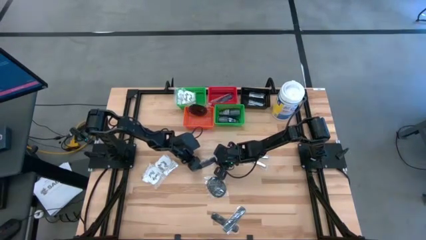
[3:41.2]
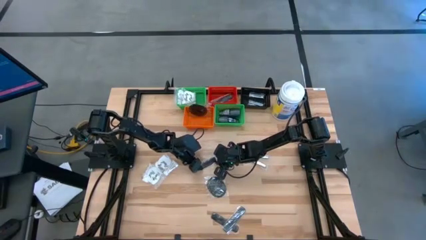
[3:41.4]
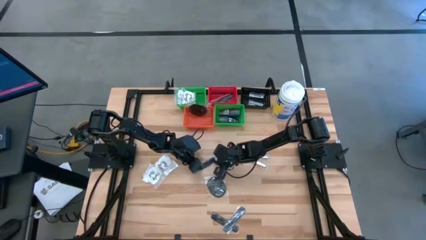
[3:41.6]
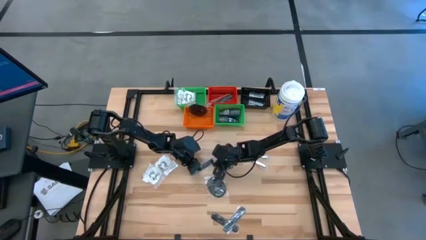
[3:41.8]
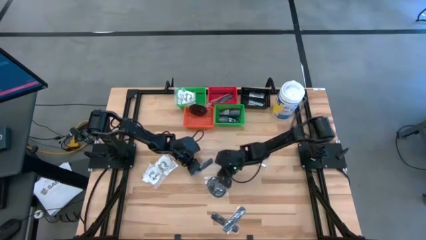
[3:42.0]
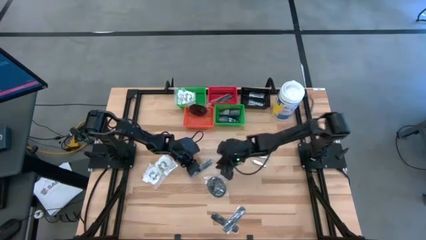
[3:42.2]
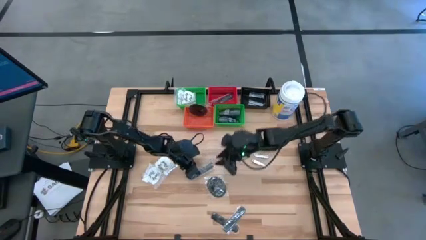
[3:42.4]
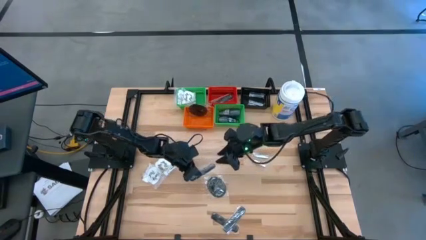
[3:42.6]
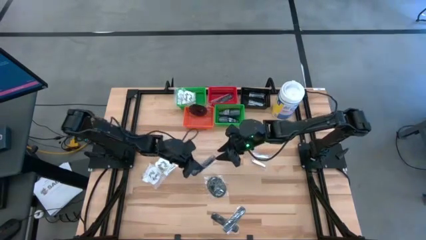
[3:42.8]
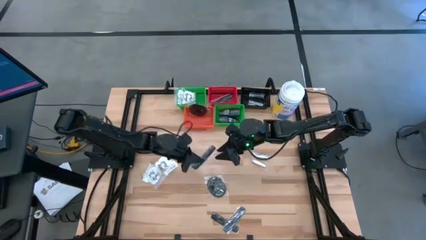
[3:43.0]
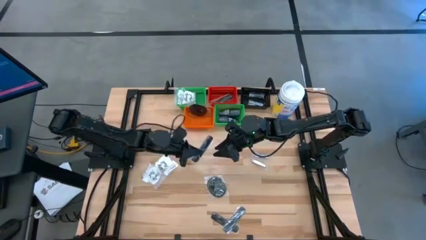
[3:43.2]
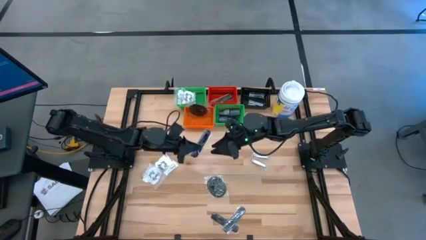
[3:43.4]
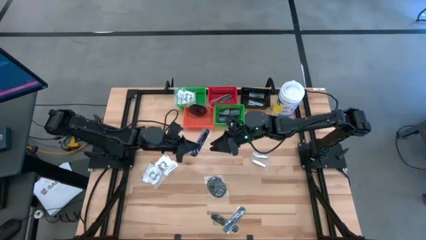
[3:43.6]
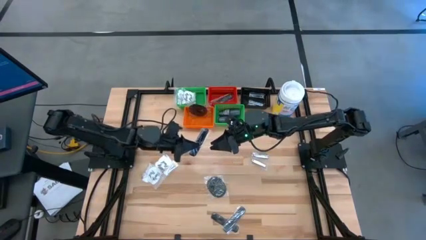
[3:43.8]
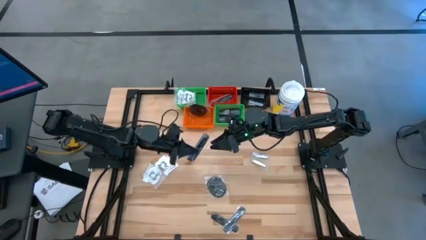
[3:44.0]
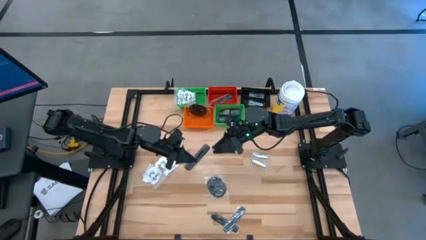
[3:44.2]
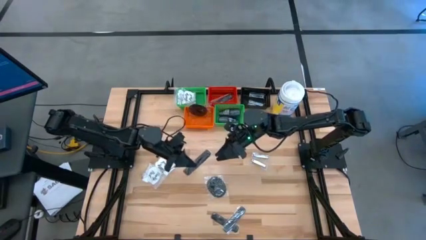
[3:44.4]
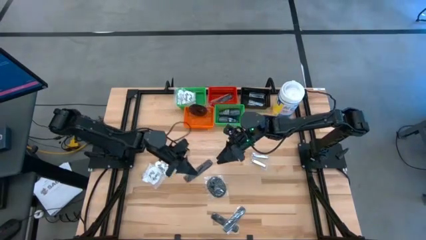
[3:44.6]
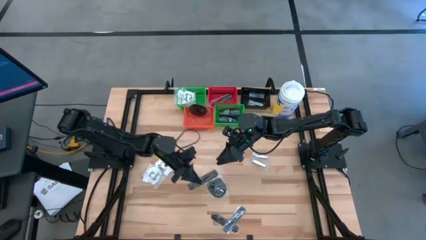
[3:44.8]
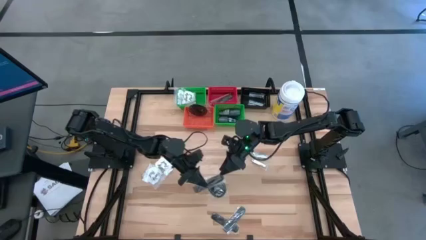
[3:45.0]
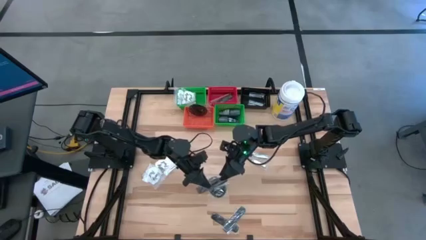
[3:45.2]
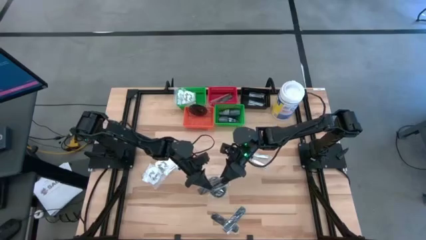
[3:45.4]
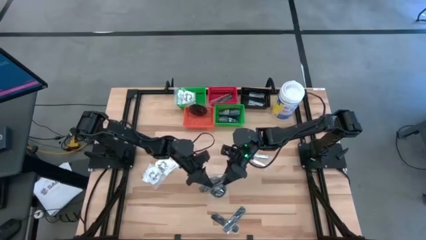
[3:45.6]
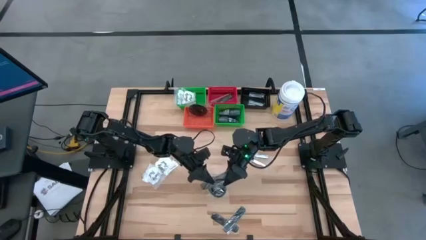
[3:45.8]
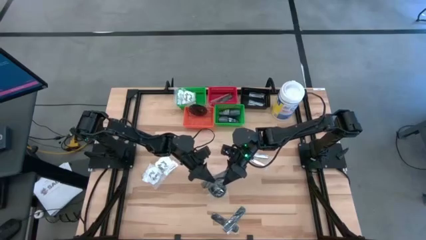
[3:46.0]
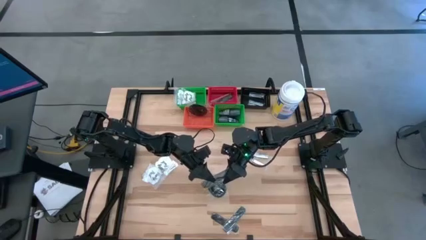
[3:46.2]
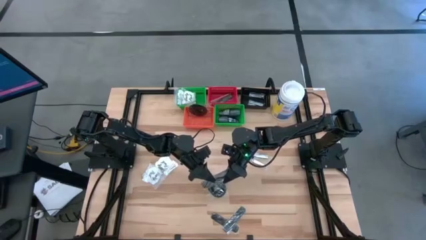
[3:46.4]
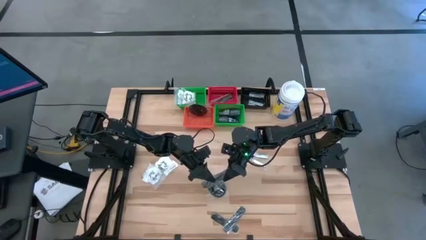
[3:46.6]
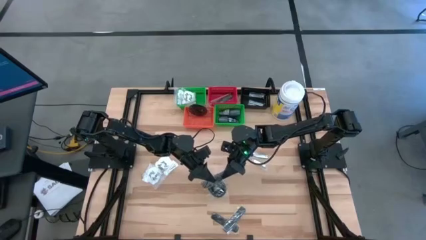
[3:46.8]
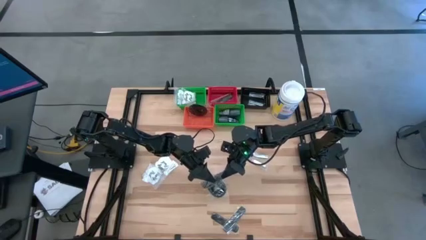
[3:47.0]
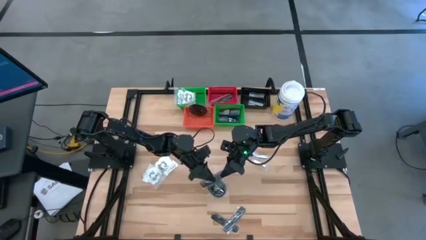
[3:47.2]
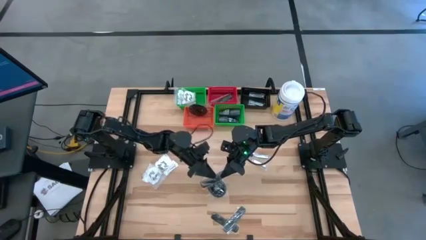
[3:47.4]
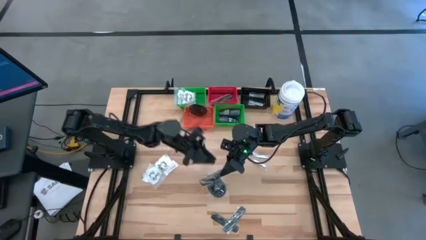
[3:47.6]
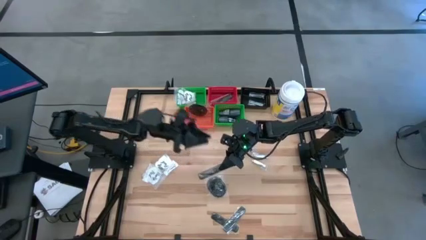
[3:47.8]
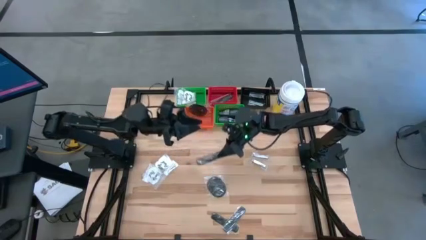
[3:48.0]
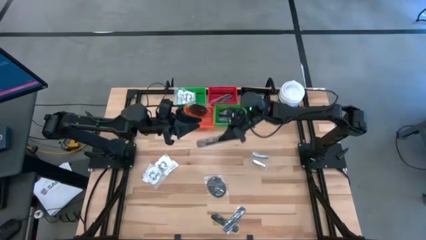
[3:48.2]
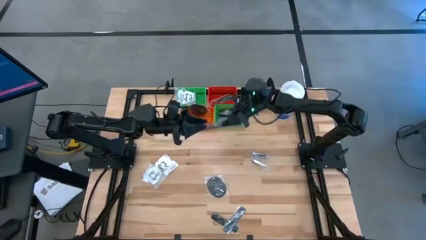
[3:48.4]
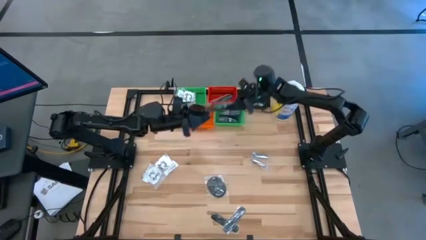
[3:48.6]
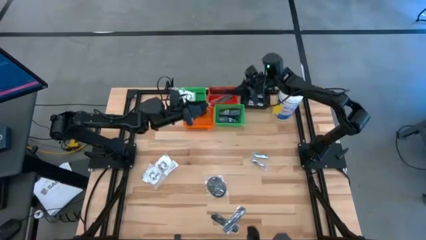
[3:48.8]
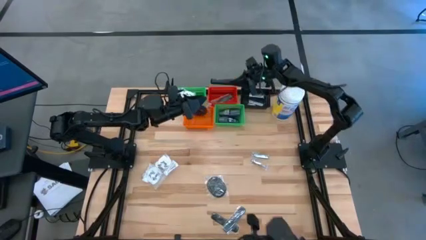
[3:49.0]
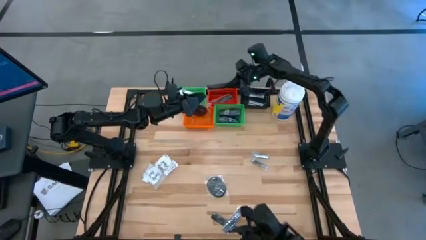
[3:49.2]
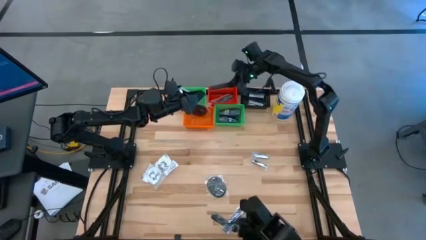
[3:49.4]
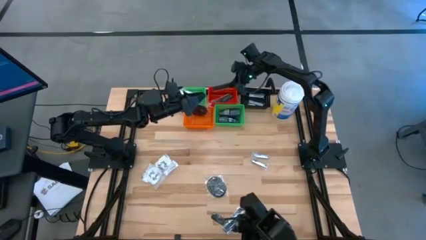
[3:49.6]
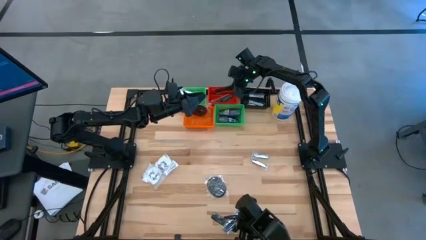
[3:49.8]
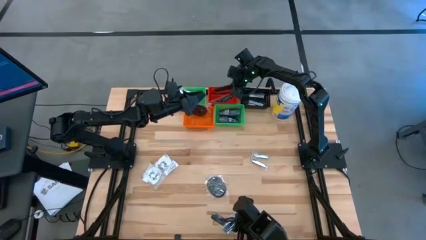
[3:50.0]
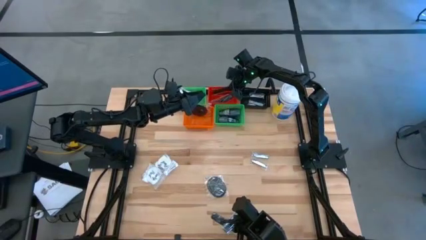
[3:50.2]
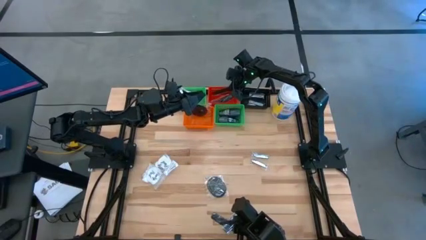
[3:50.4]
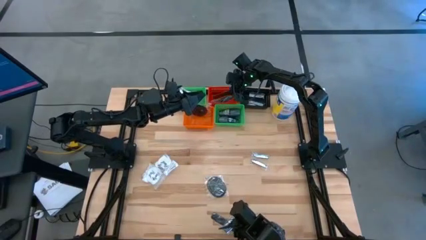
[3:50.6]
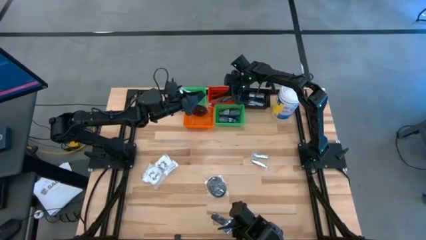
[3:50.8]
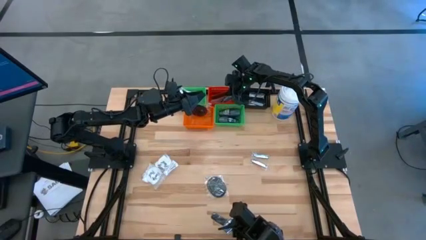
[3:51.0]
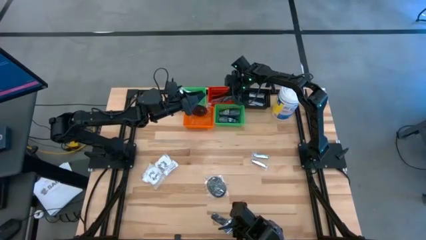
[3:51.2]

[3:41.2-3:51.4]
Task: Pick & Place Travel size toiletries
Put the black comb into the red bin

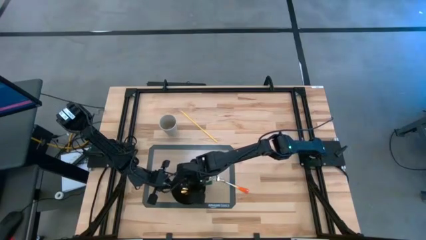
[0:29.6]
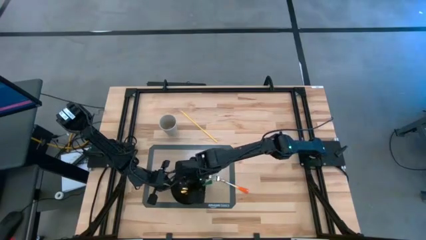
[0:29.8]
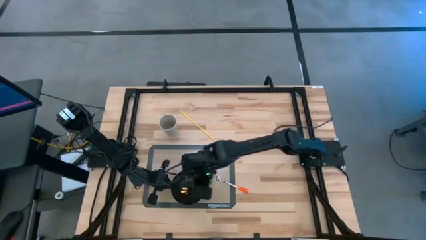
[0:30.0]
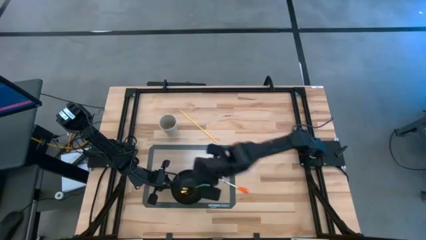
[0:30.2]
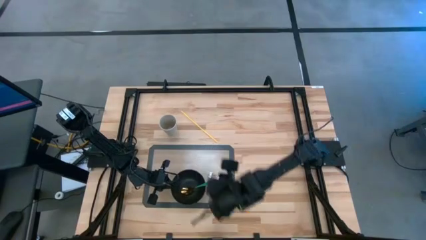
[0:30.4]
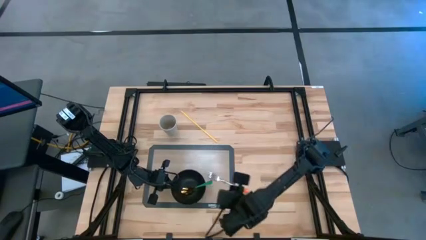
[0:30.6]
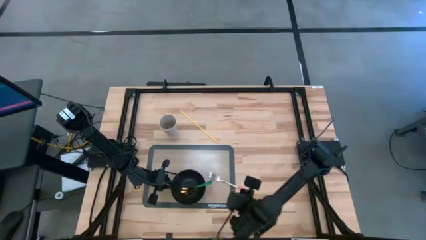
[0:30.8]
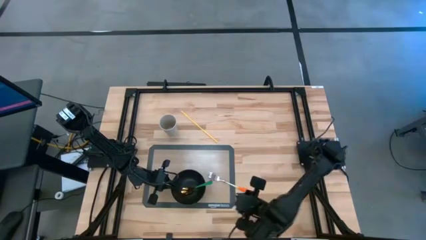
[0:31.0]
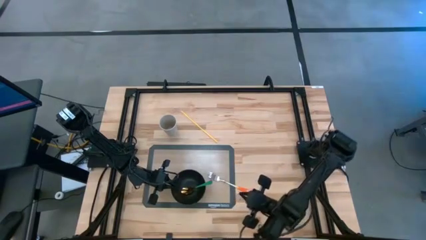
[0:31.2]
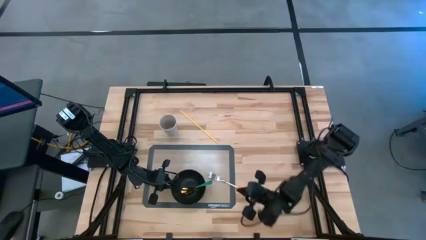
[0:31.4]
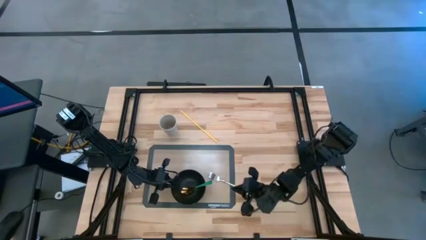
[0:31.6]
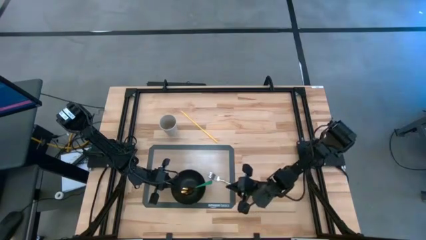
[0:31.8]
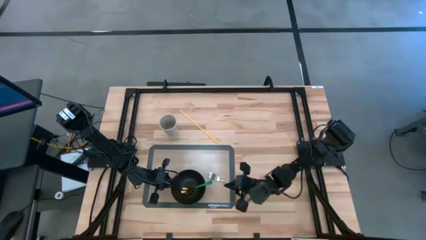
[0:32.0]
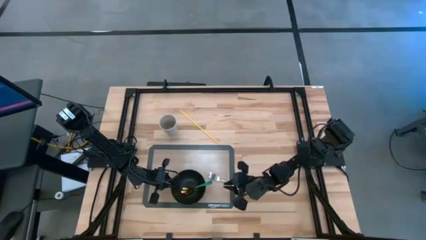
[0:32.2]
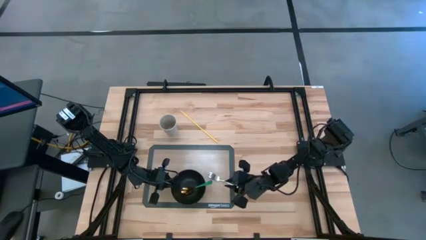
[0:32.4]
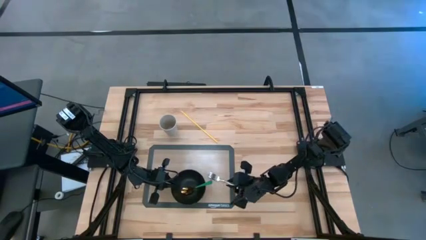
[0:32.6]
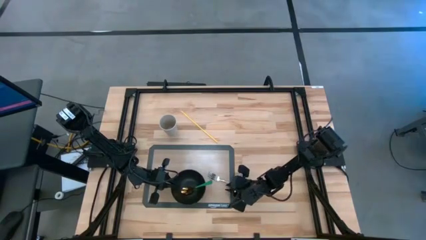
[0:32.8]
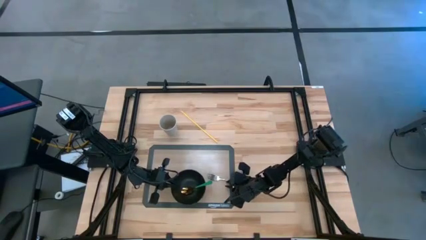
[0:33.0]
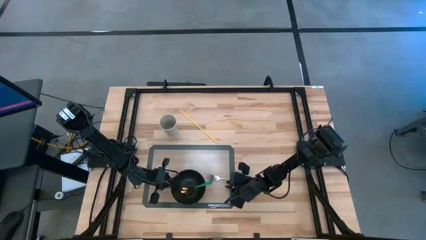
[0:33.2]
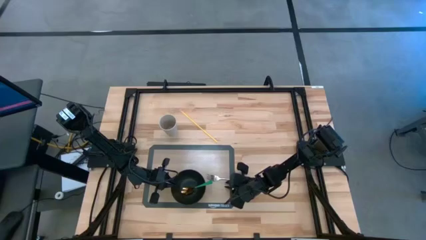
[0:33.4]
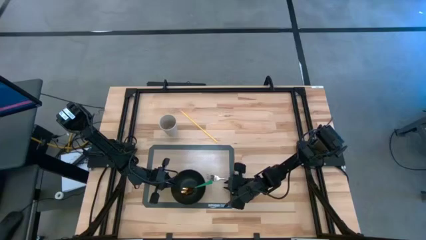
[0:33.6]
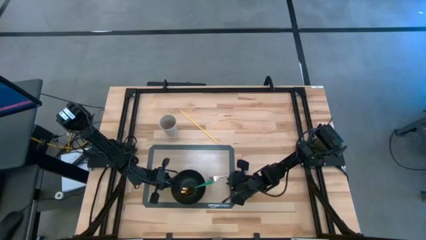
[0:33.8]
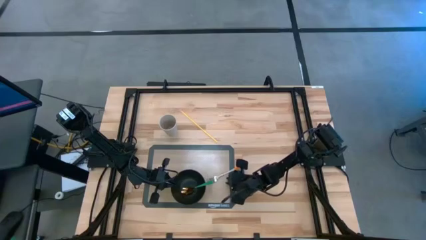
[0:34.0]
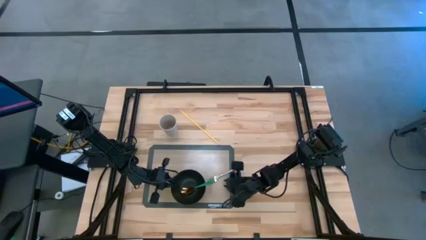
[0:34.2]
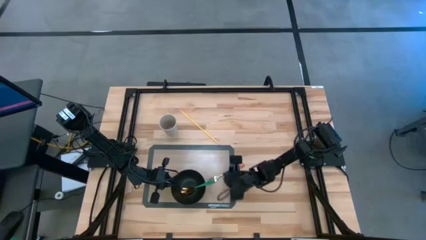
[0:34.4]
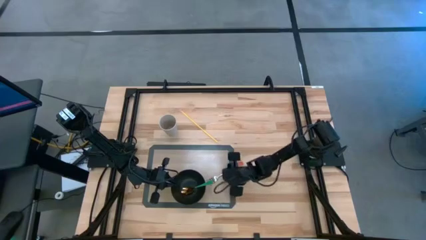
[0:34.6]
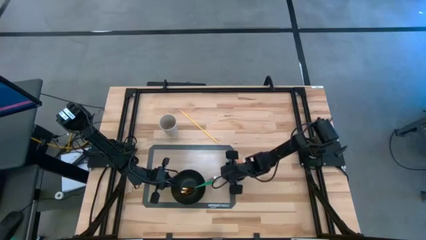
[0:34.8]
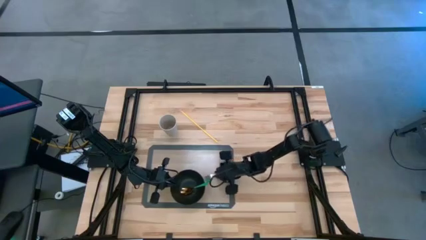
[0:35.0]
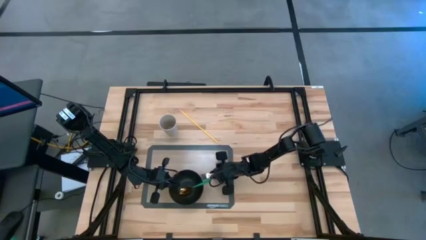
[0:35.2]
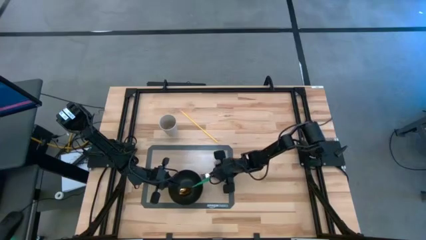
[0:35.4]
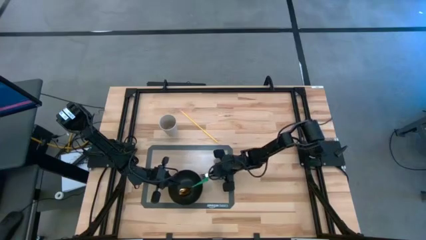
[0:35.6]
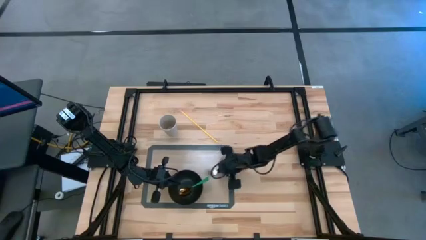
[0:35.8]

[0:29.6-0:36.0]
Task: Pick & Place Utensil
Put the orange fork into the black bowl on the mat
